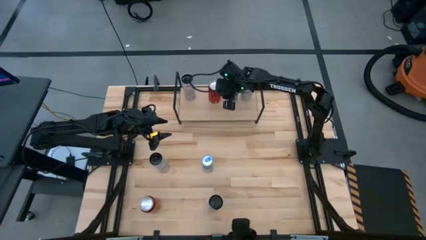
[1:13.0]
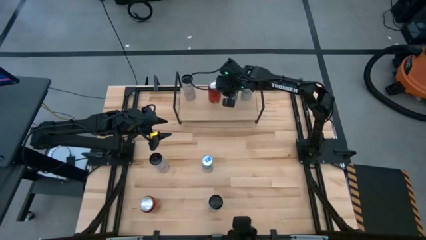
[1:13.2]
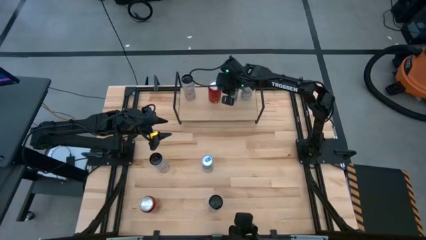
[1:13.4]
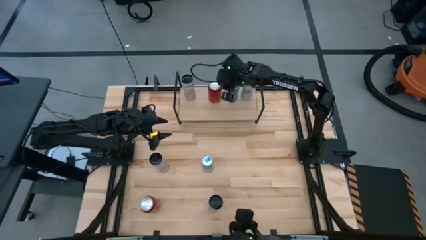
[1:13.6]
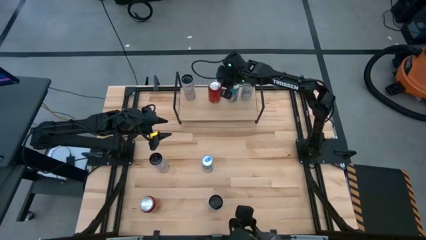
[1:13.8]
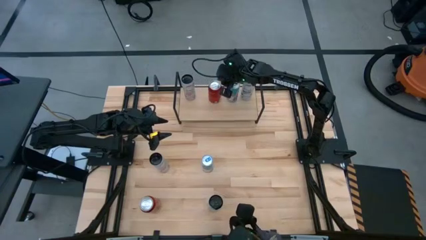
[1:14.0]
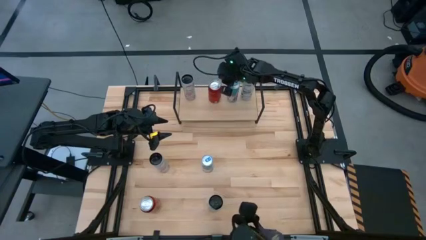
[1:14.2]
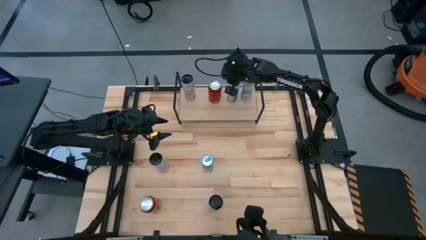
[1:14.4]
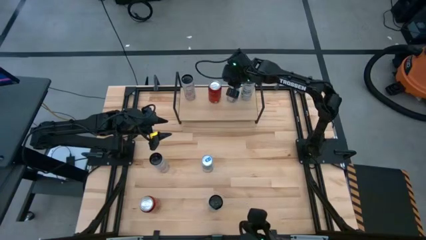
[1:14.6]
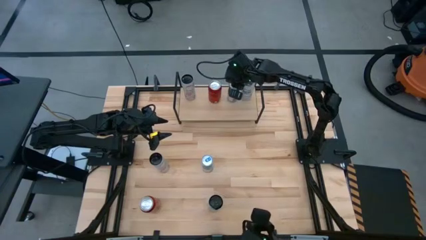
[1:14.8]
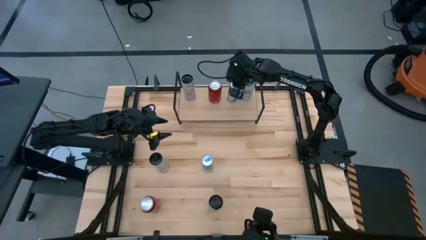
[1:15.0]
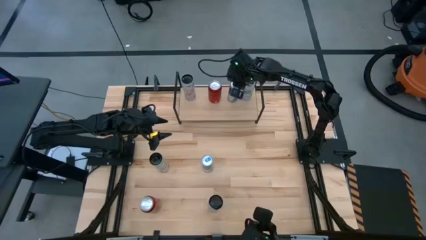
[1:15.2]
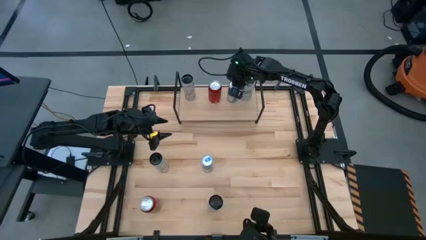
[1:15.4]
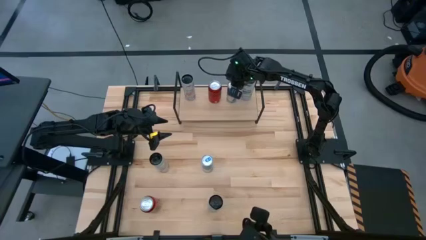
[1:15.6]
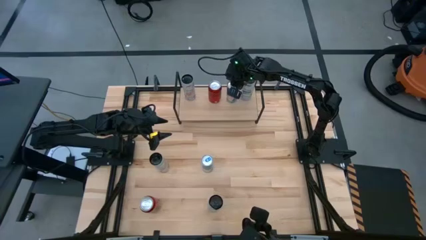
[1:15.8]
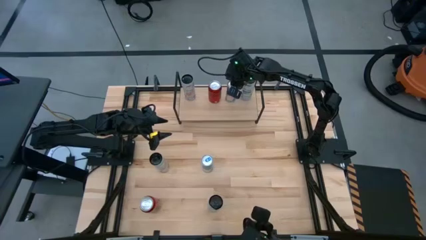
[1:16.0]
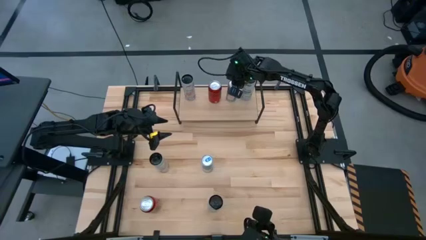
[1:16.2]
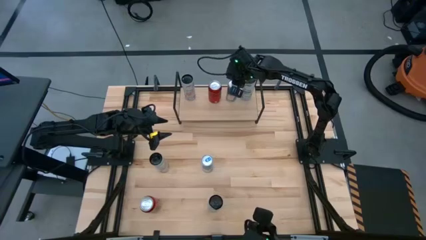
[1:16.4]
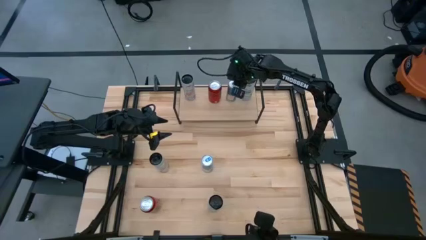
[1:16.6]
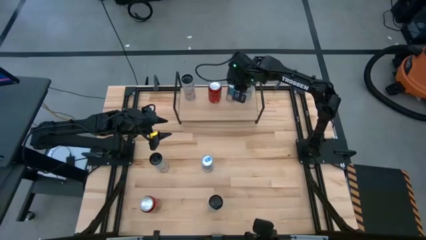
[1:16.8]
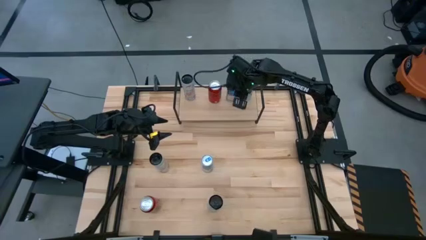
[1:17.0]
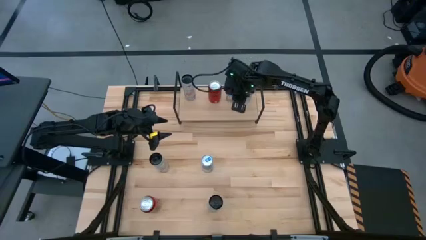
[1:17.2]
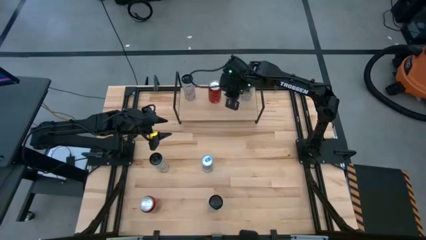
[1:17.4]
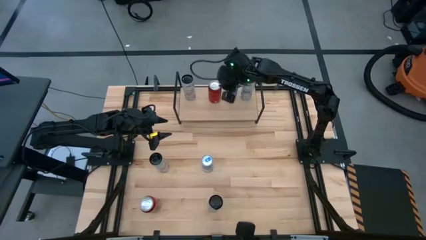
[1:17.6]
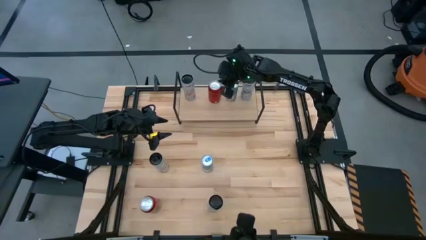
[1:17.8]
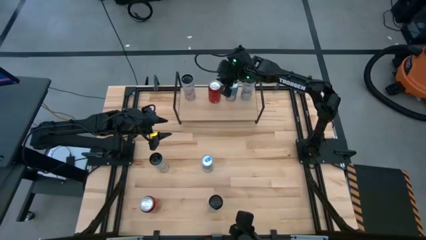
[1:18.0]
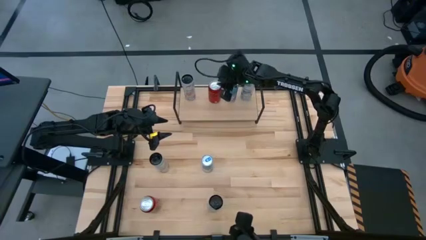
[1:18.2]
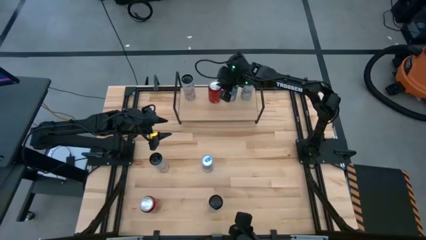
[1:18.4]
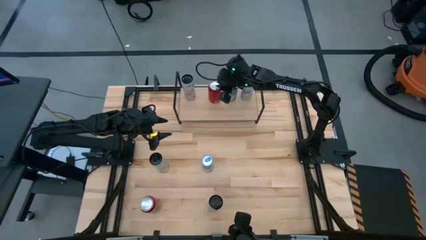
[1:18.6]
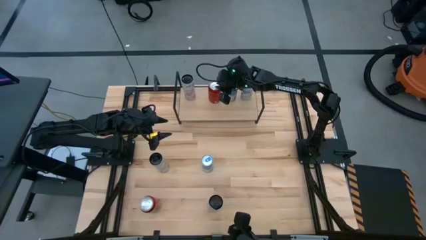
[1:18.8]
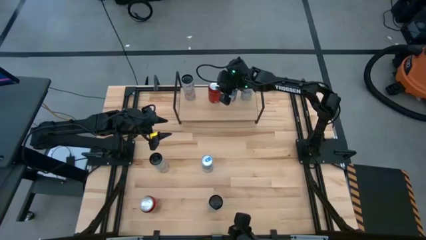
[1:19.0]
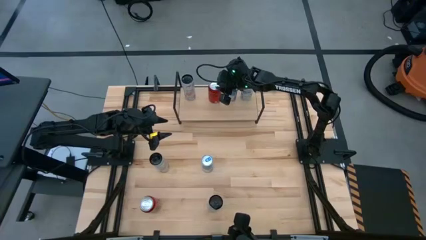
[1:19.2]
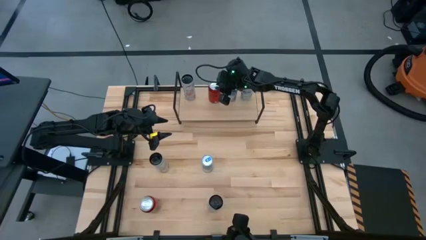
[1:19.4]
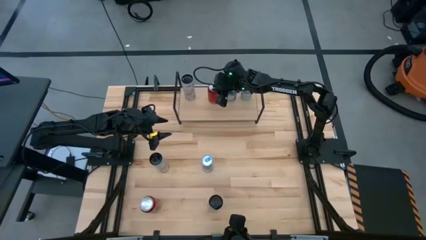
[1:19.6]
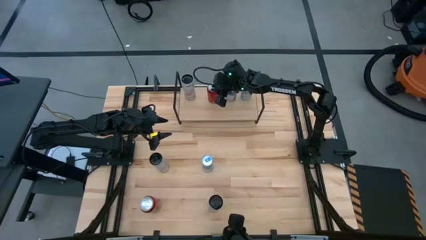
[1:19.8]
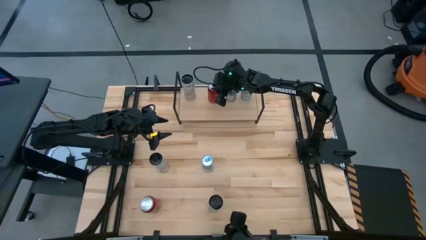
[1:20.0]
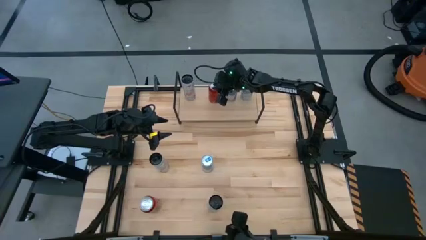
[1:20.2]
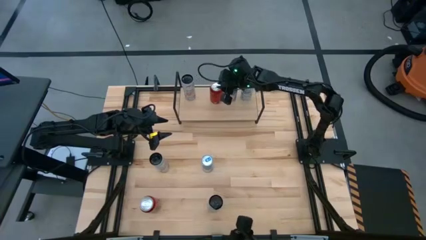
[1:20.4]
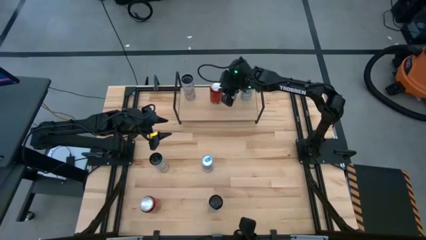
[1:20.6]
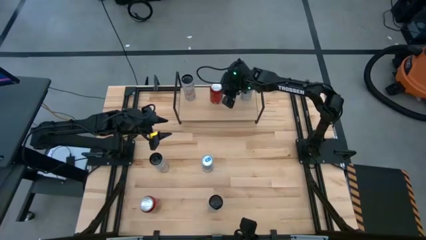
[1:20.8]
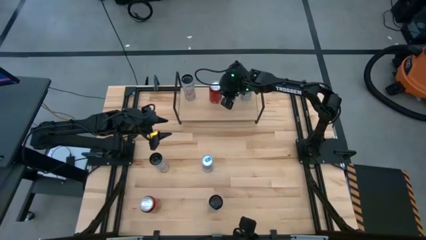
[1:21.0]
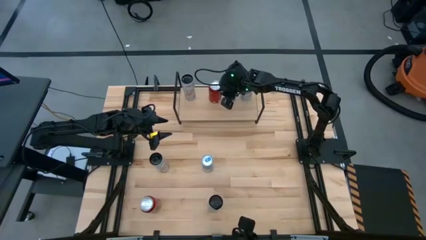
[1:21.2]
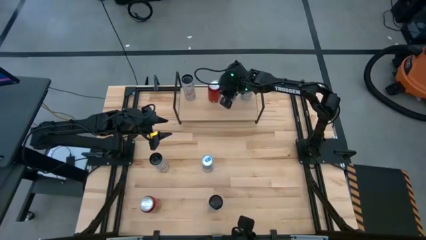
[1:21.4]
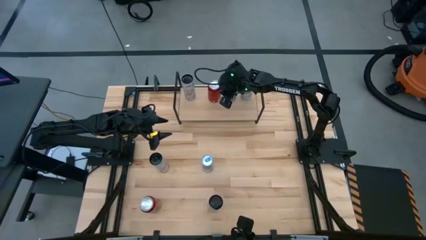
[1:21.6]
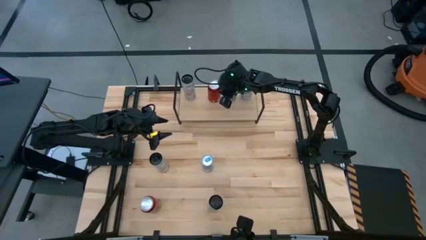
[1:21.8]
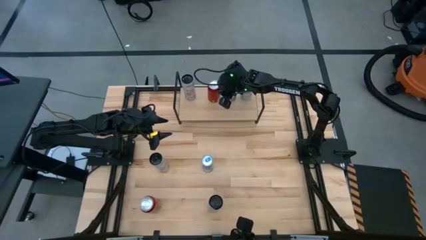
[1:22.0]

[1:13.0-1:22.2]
Task: Place canned beverage on shelf
Adjust the soda cans on the shelf

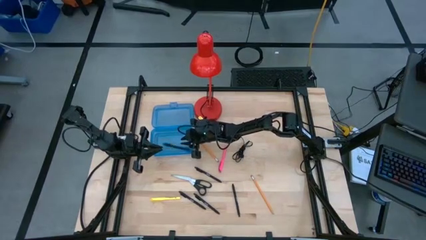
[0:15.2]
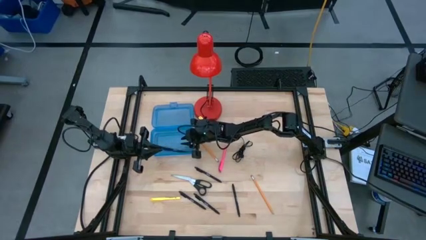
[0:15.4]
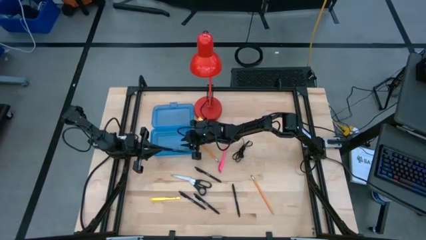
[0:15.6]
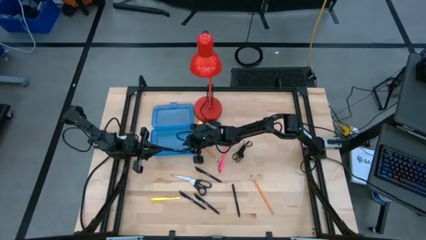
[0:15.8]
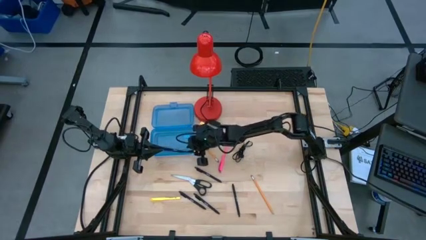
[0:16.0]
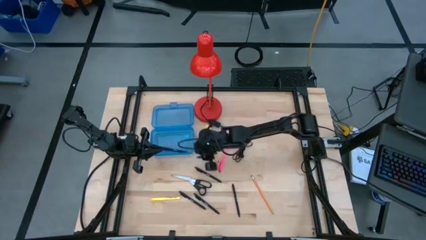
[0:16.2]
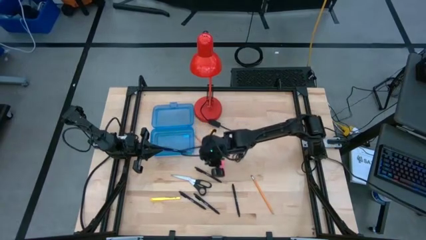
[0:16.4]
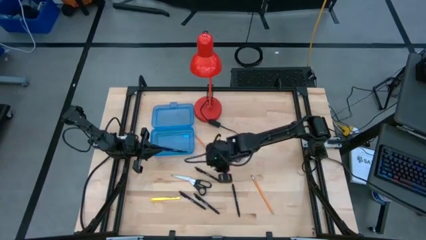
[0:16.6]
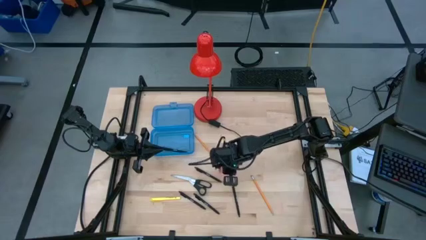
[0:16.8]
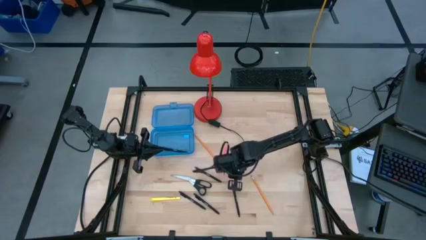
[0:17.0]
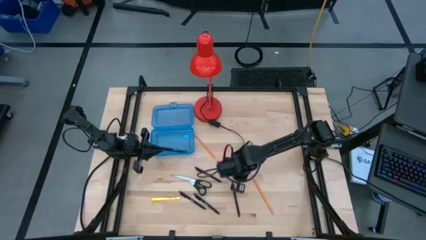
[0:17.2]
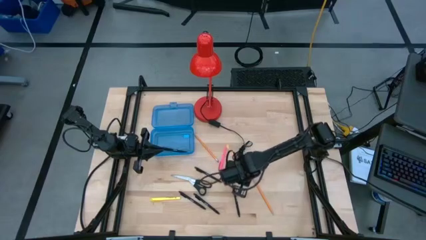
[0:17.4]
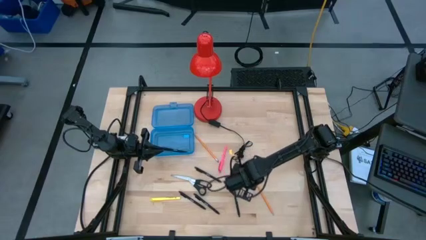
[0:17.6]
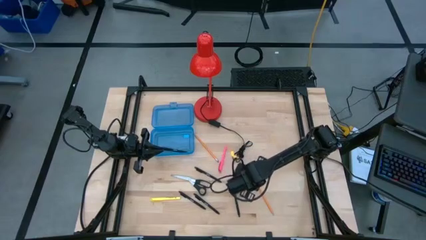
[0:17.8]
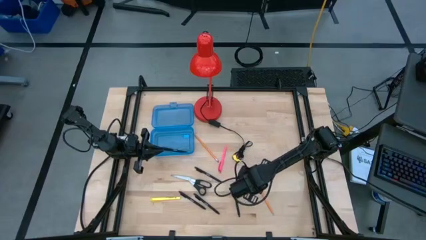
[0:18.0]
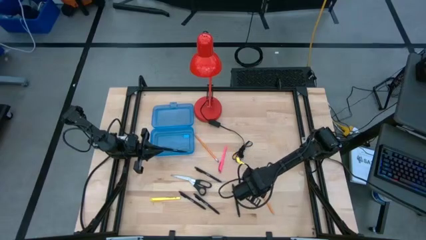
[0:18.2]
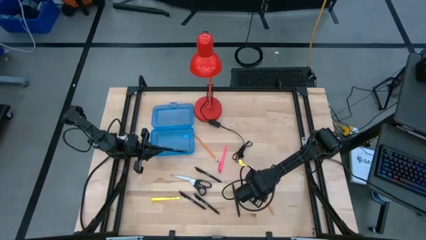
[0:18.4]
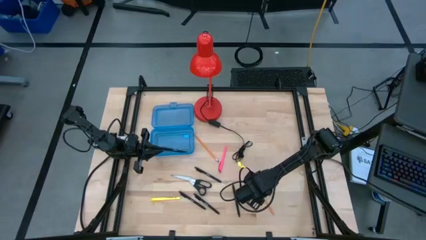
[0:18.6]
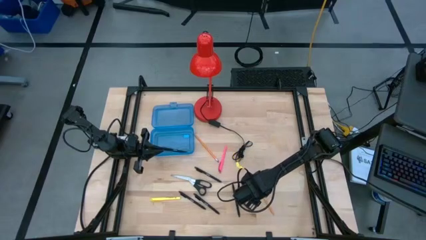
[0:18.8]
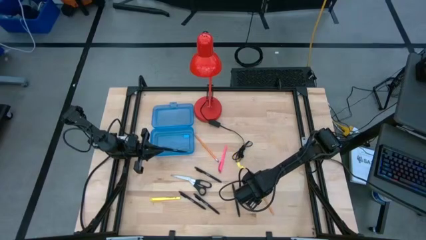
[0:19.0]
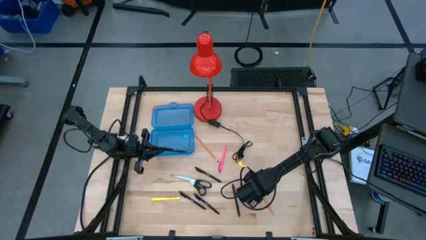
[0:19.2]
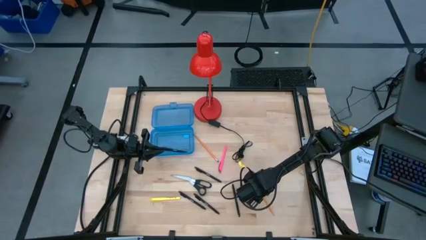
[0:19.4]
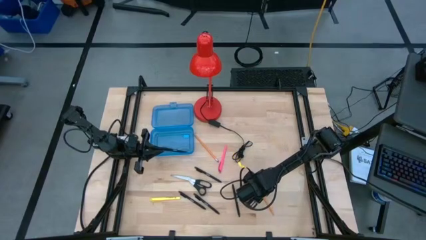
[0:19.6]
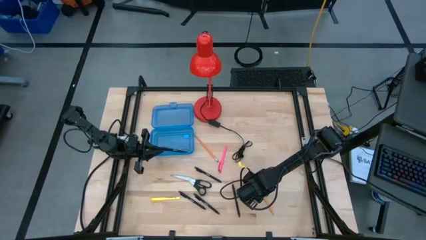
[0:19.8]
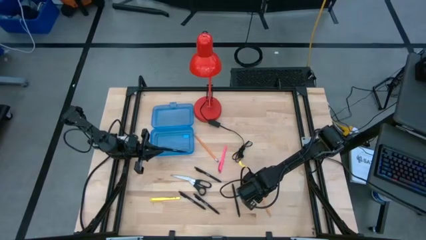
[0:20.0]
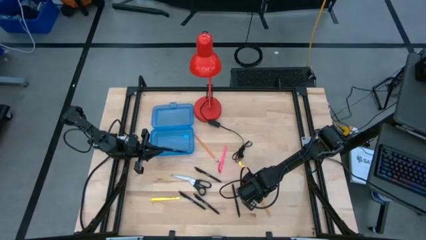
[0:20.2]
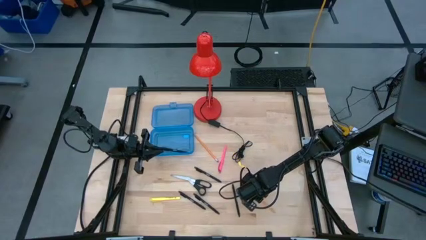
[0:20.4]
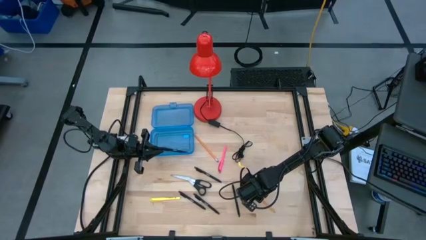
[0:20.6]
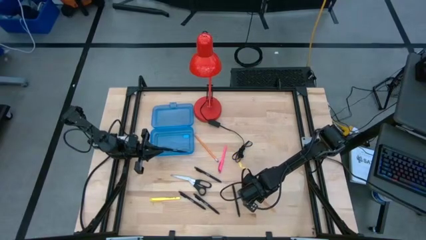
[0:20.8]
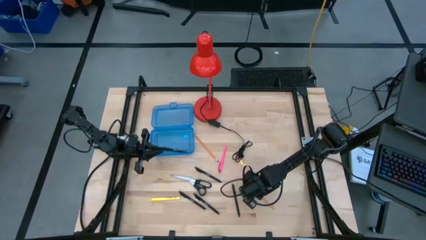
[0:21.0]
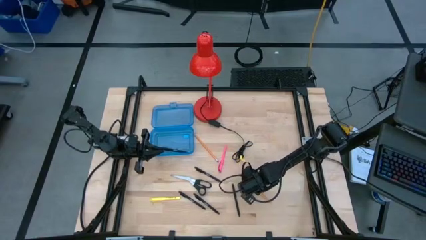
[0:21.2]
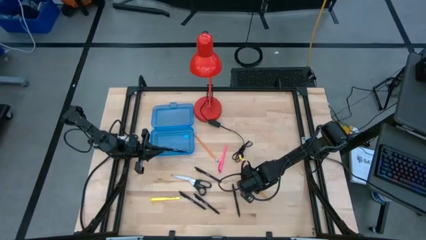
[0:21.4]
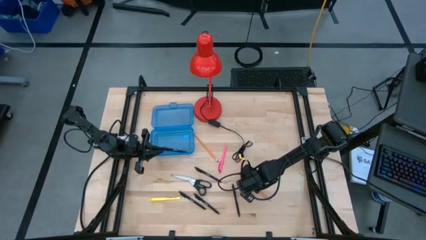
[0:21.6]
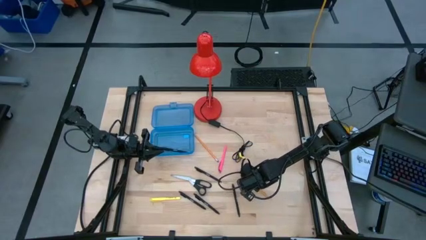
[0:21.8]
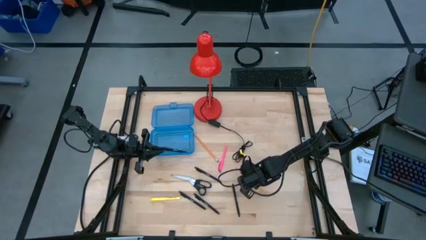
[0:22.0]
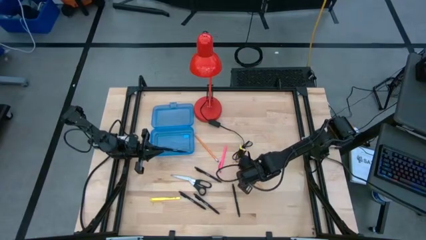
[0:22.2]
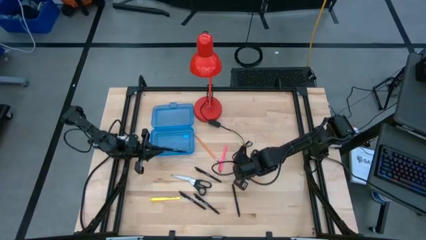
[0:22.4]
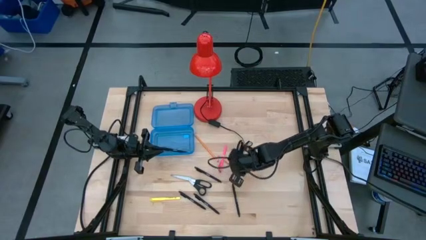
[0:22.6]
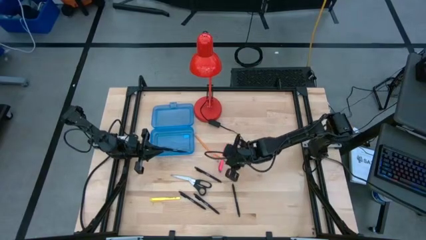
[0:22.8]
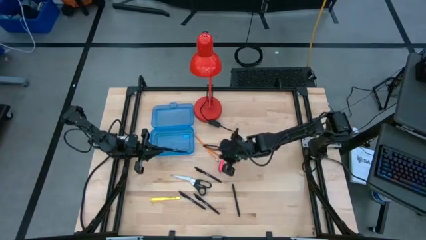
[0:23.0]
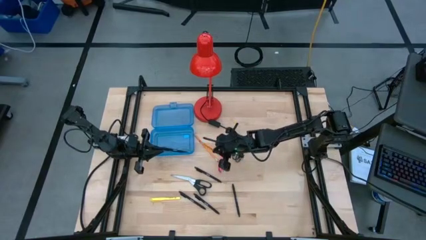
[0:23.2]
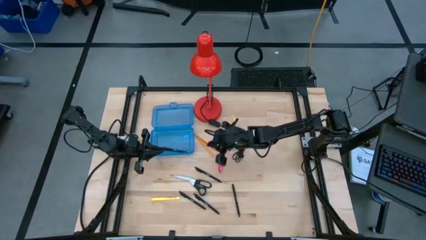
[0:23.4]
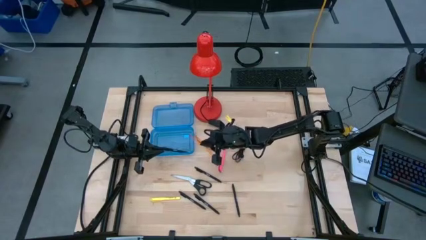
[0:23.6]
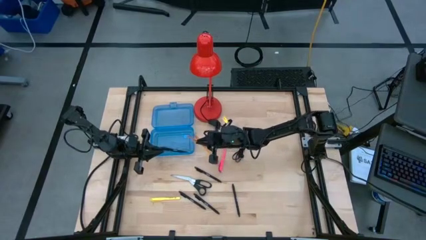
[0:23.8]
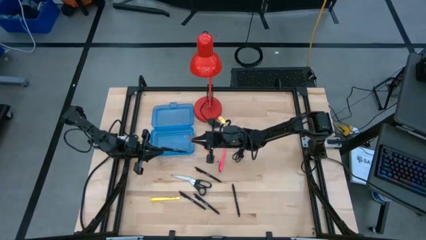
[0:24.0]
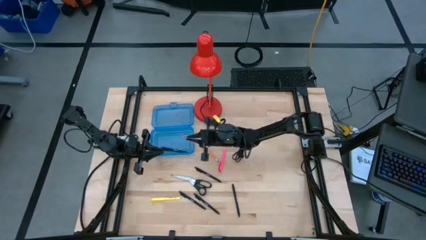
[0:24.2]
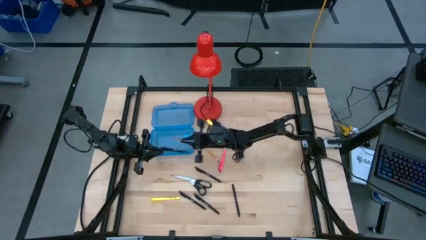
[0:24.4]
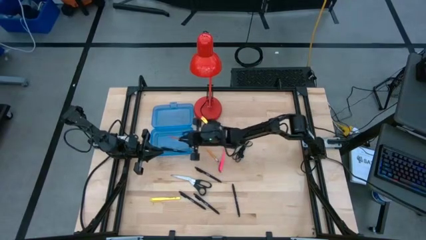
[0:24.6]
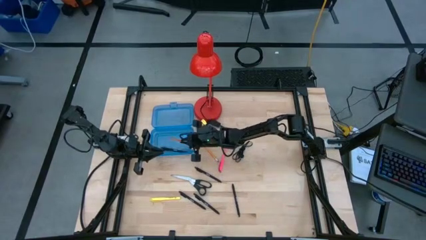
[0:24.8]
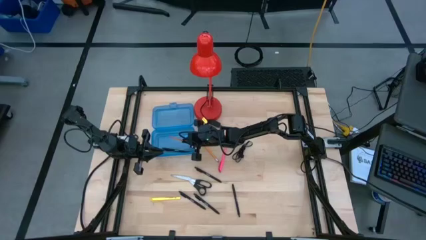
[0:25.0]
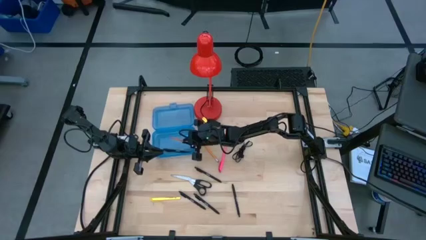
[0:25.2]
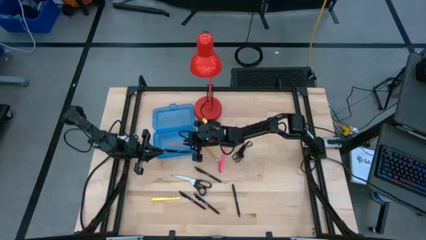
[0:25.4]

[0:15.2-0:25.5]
Task: Pick & place school supplies into a supply box
Put the orange pencil into the blue supply box
